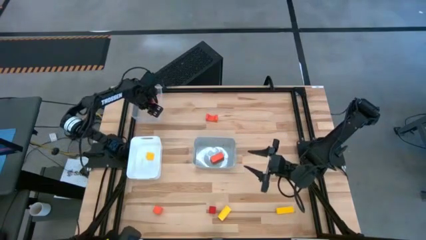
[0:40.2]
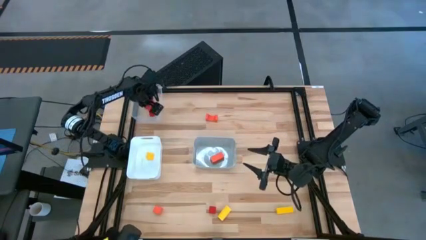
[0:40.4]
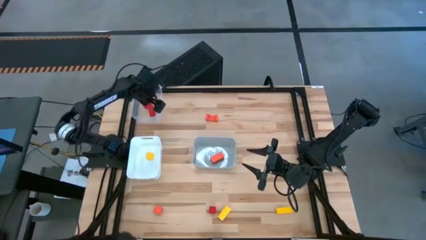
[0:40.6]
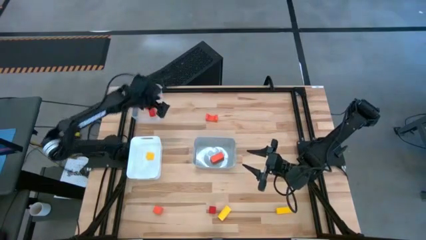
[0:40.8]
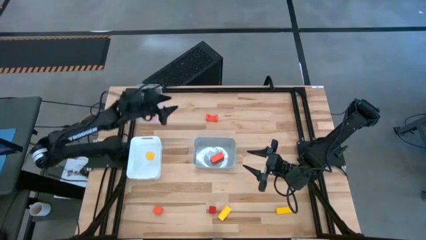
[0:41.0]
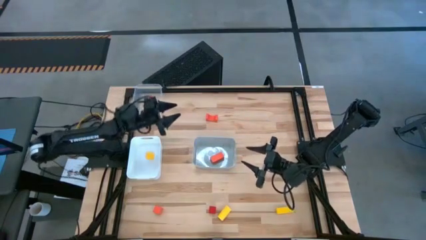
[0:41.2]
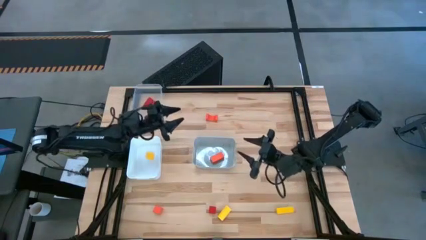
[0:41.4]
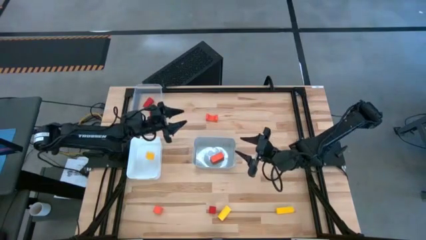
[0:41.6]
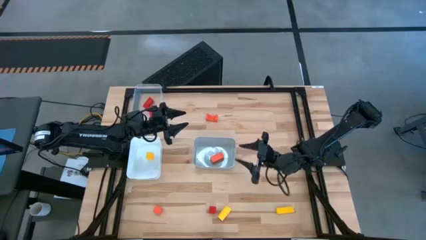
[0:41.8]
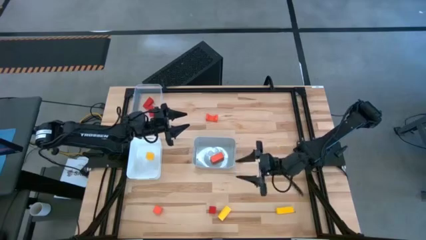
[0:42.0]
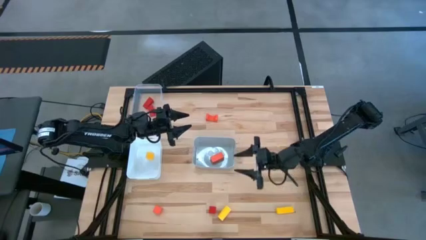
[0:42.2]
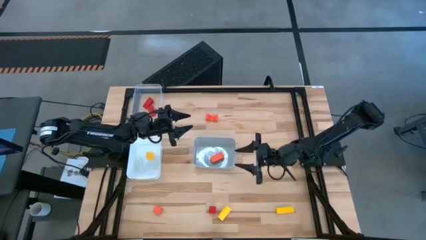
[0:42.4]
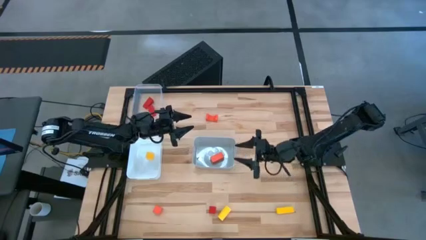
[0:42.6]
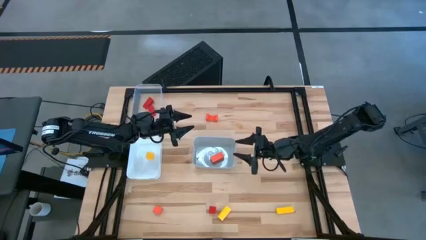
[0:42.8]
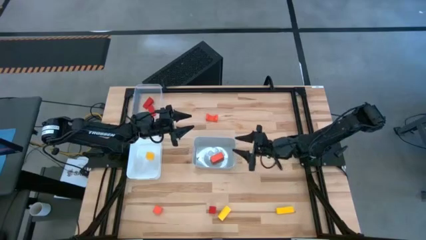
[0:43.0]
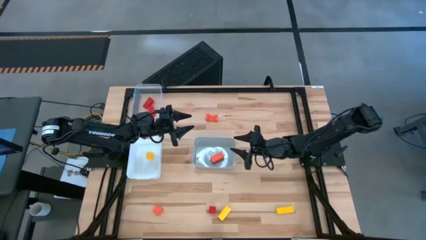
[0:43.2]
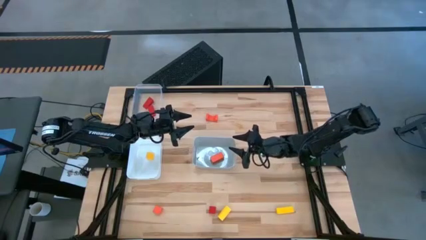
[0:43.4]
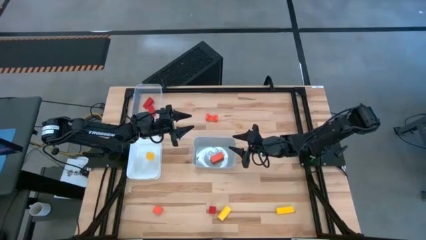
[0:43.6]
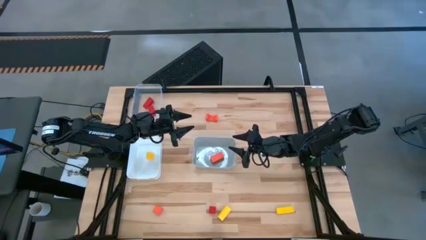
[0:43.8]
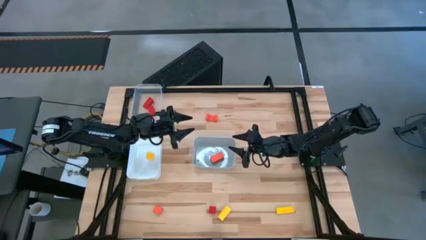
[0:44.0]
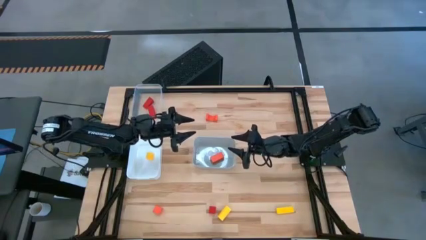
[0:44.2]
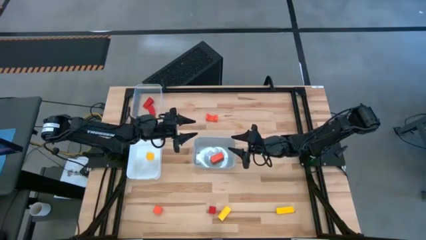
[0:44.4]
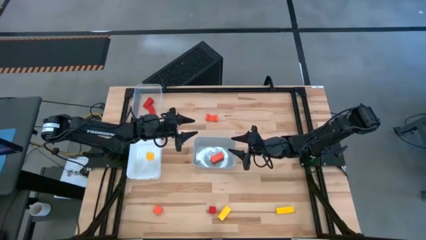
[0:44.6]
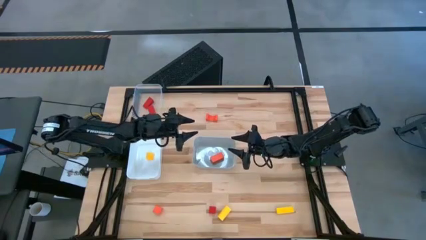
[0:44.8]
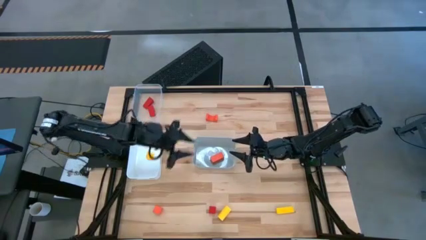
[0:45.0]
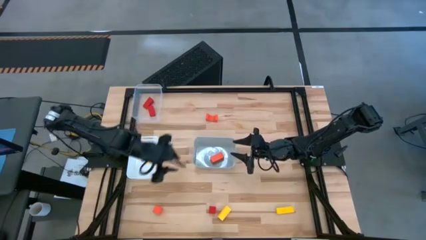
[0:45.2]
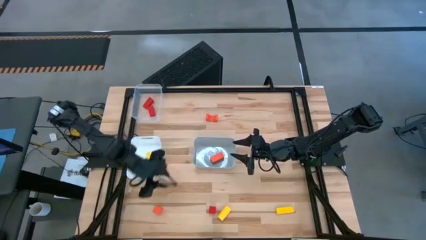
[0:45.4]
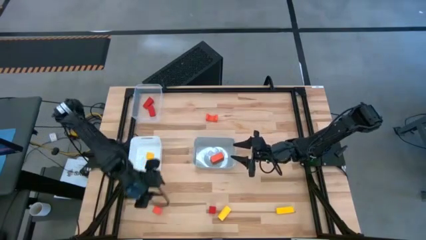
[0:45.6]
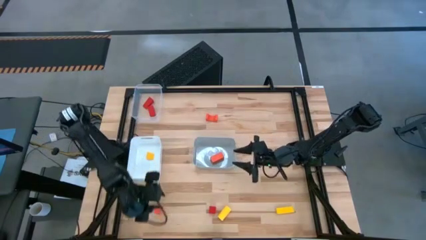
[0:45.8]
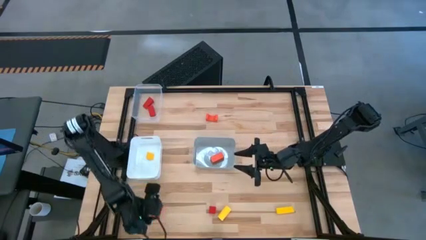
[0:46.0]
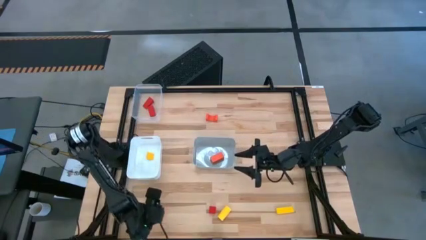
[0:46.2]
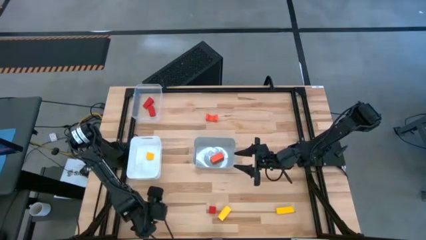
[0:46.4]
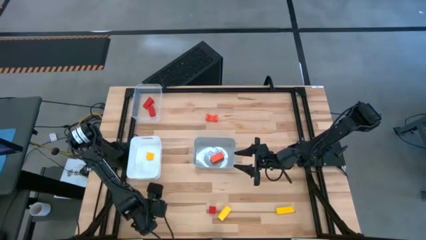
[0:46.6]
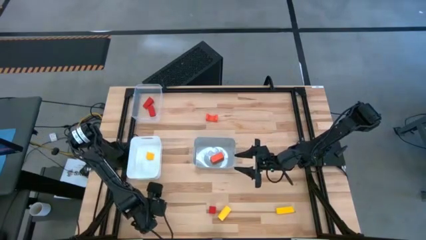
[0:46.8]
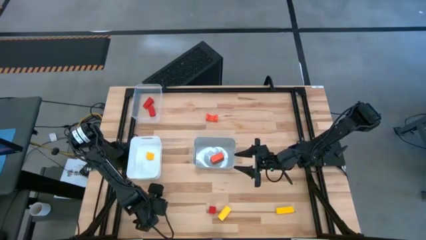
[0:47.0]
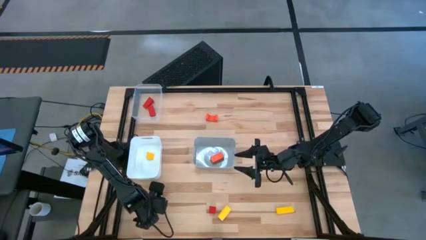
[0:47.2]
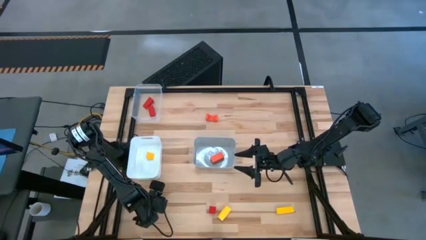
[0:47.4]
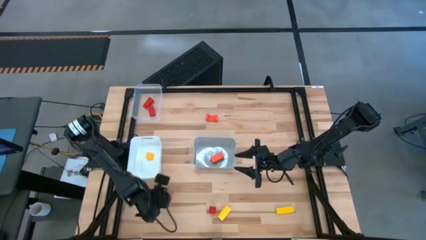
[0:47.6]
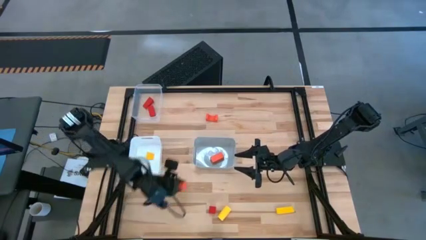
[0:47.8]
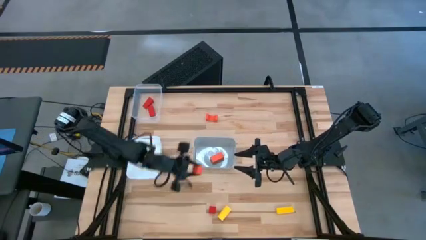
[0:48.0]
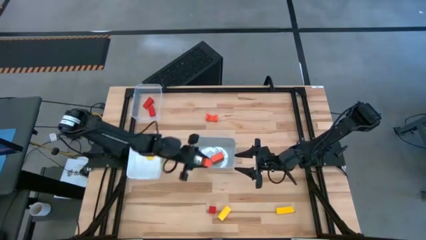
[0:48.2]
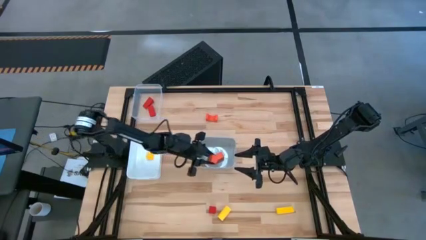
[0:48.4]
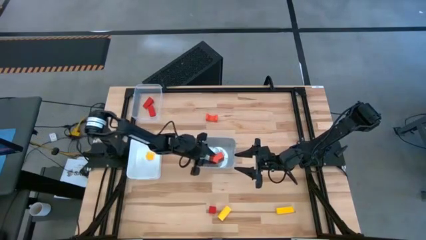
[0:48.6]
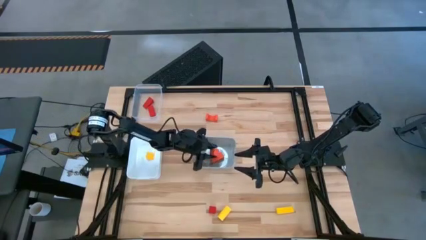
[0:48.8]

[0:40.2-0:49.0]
Task: Sort & place blocks by color
Put the bottom orange wooden block into the gray bin

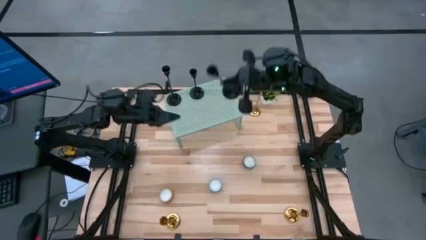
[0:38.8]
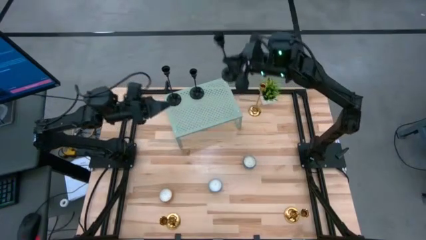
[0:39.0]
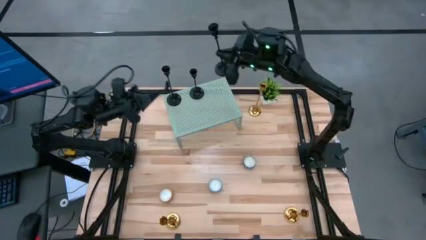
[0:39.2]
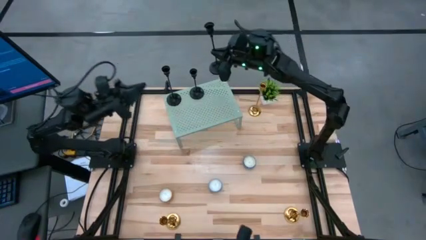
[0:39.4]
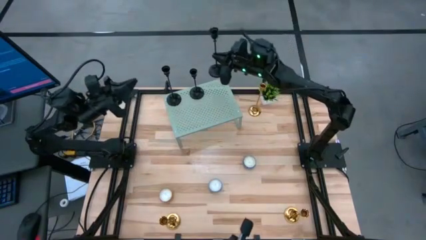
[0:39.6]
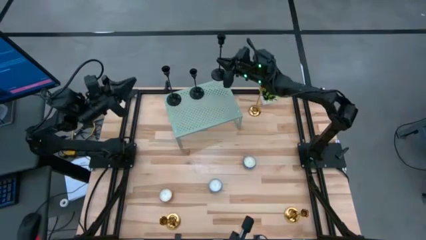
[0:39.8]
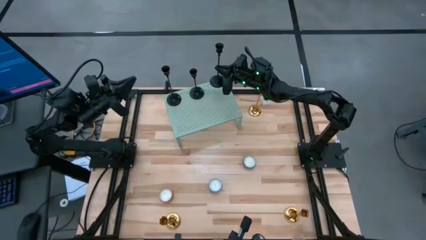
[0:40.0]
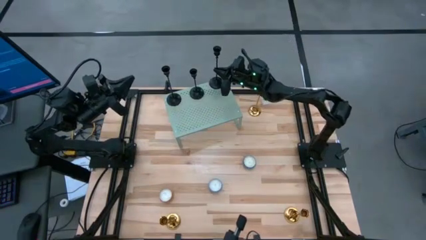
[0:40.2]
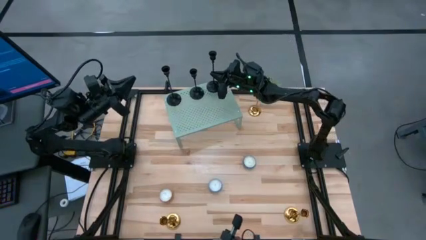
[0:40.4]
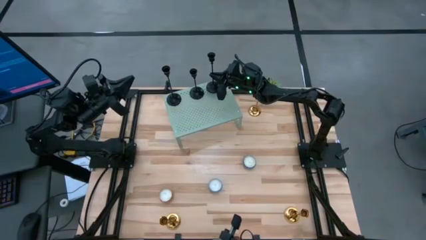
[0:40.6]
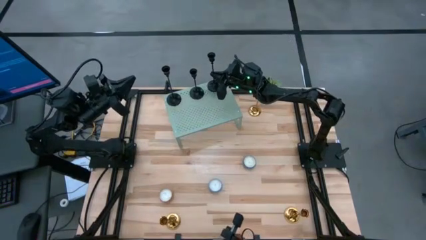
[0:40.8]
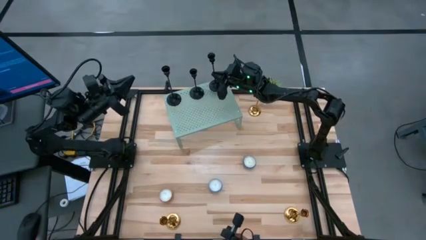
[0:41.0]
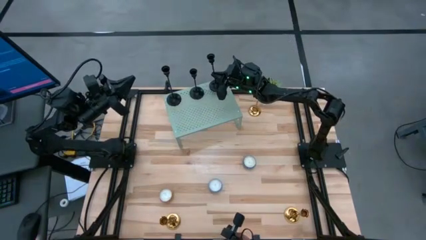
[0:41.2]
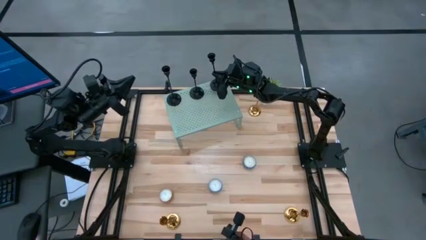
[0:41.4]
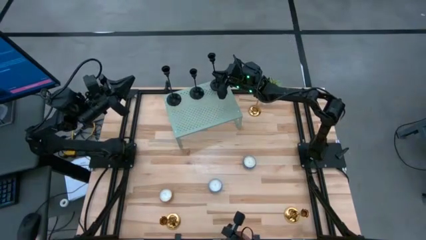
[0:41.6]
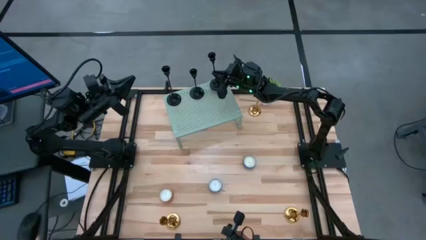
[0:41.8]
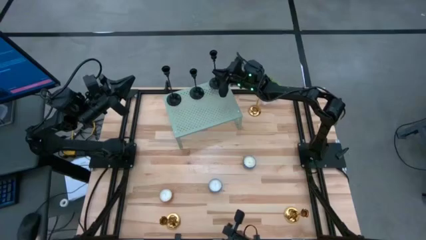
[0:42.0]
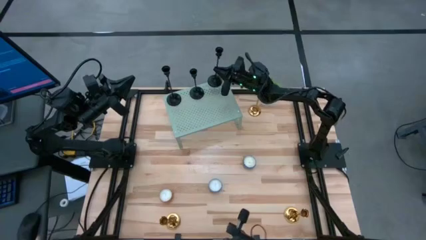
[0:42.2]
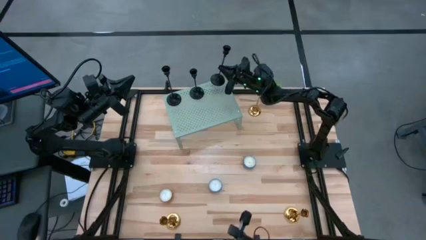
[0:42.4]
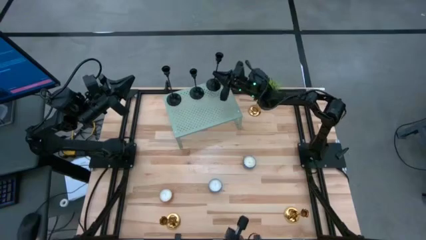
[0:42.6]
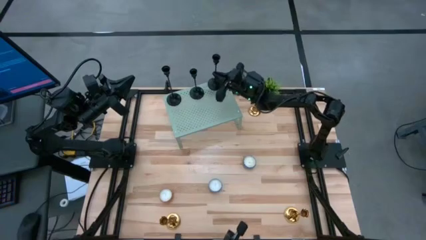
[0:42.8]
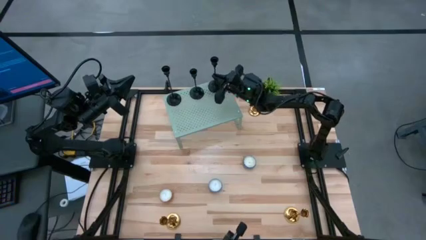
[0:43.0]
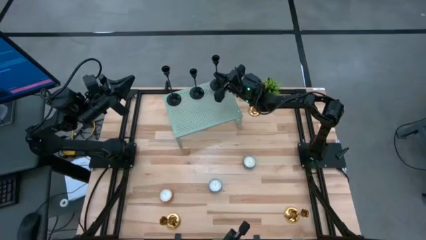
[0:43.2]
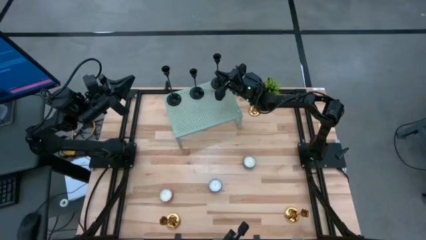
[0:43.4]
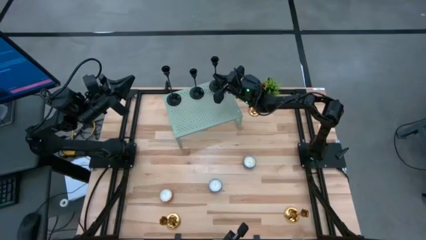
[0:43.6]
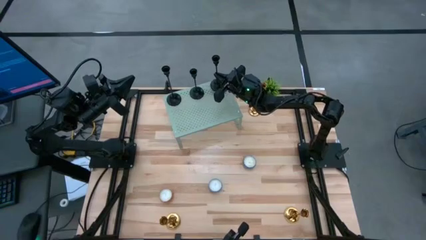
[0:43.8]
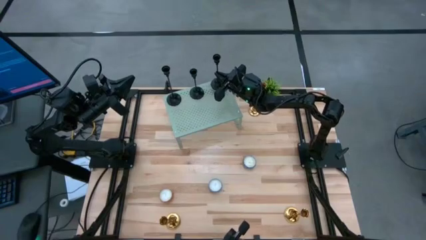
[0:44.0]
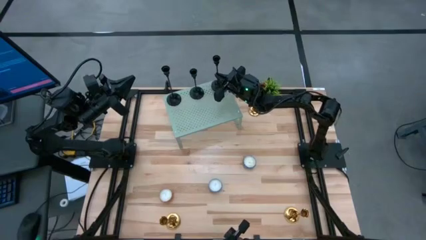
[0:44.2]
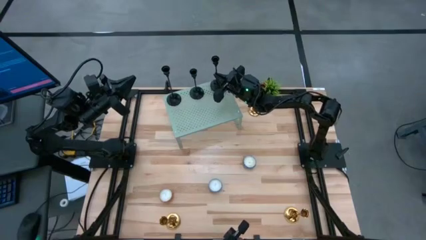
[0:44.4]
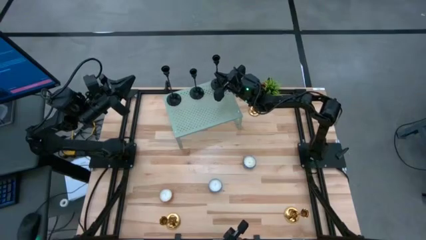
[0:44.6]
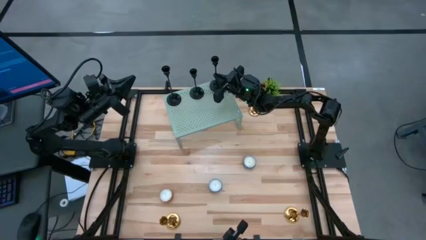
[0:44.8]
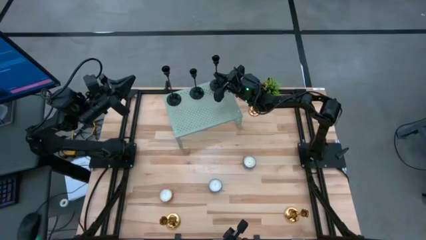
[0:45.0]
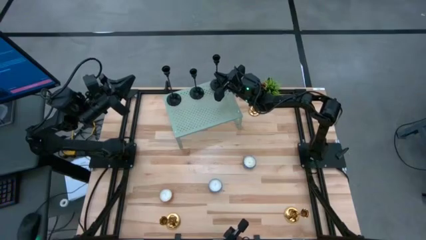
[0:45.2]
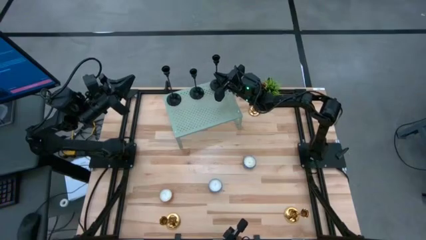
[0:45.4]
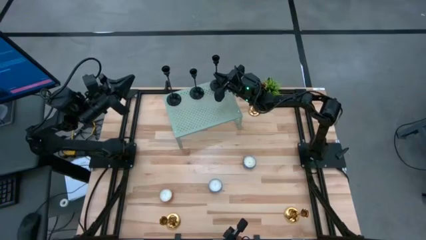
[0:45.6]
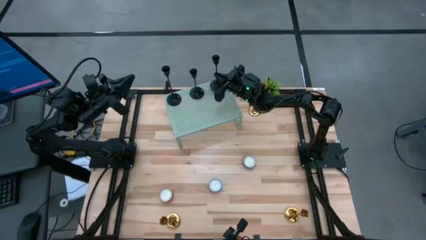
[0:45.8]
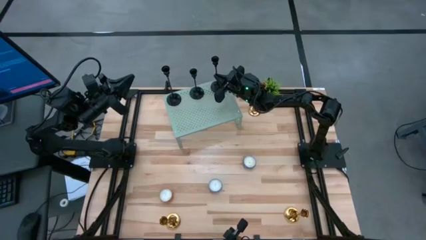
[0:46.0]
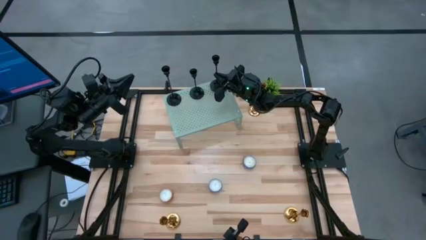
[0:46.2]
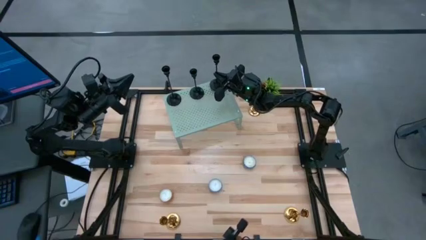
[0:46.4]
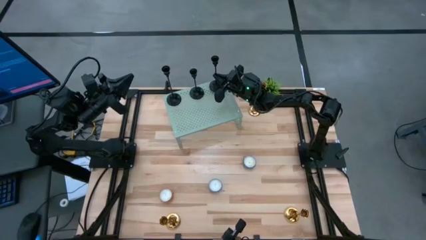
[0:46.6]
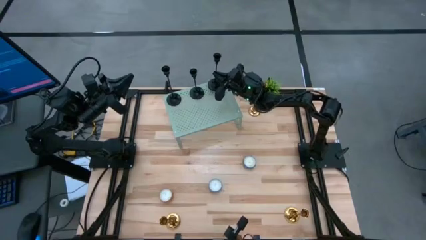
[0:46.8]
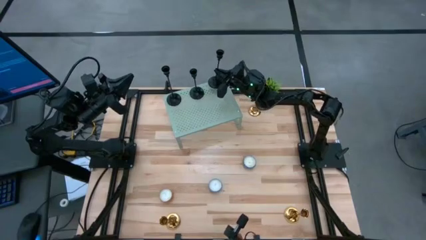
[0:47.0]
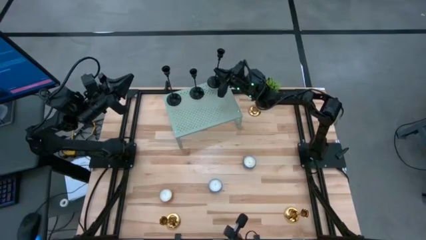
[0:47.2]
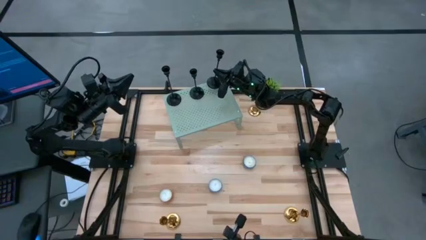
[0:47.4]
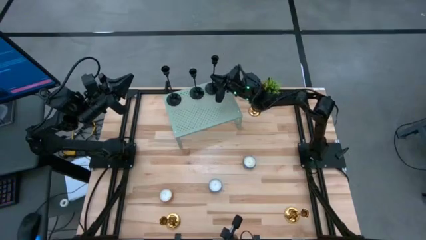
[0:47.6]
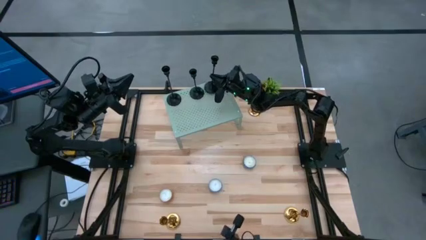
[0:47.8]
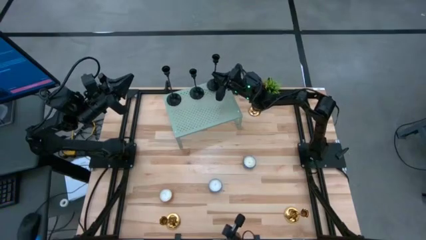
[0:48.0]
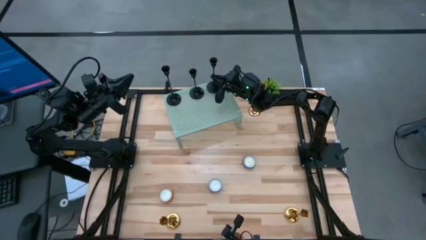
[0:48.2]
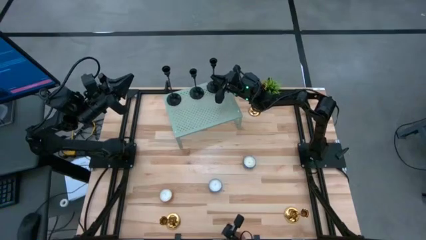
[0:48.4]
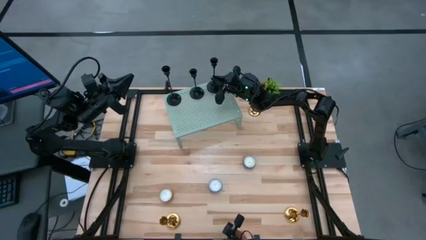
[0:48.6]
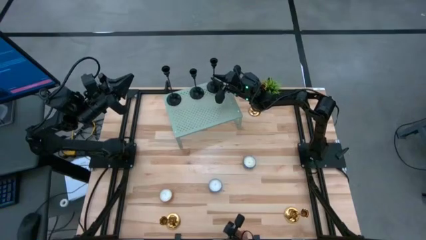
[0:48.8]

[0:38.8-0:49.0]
Task: Pick & Place candle stick holders
Put the black candle holder on the shelf aligned with the other black candle holders
